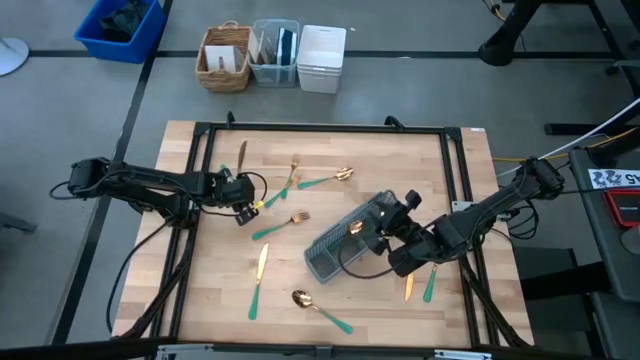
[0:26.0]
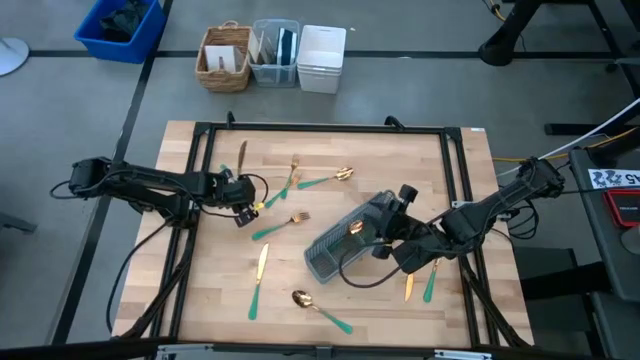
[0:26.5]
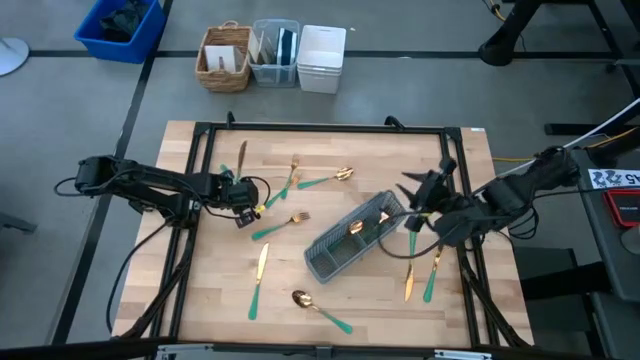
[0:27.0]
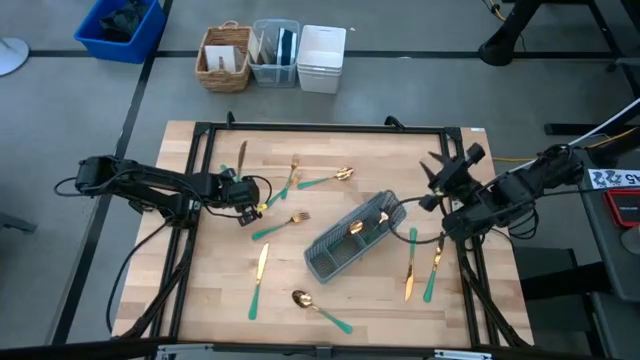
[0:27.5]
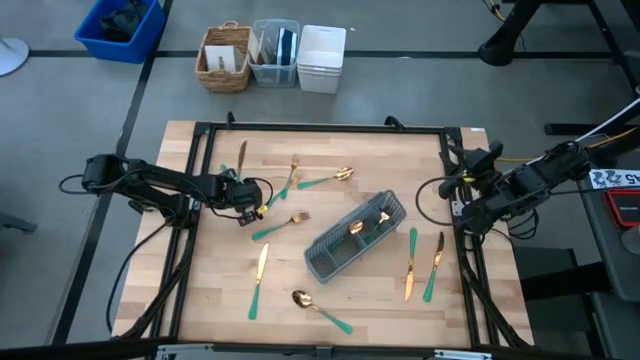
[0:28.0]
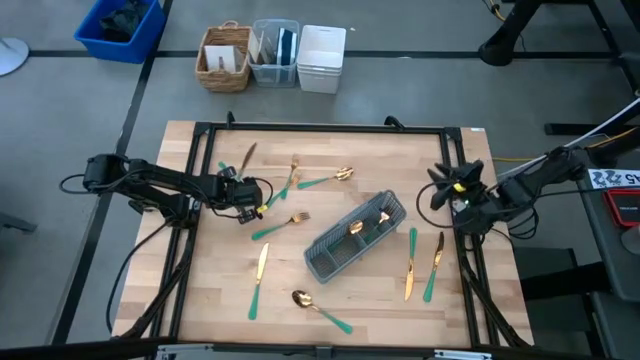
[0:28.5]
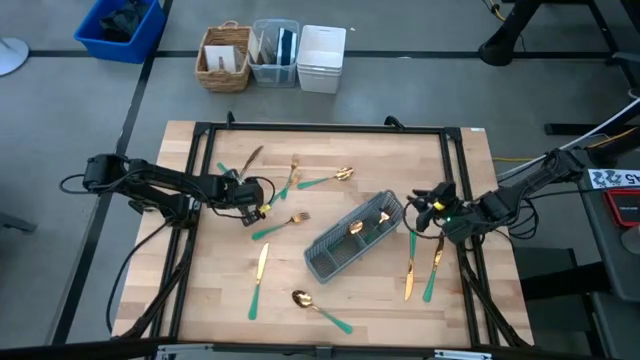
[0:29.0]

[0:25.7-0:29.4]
Task: Sort silverware
Put the gold spoon into the gray silverware organizer

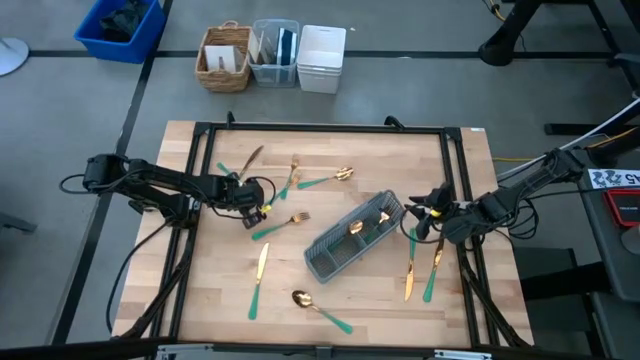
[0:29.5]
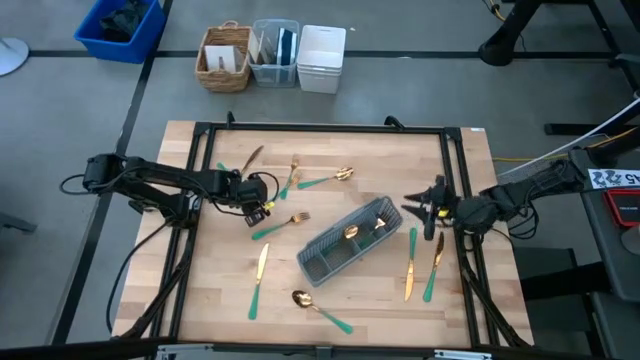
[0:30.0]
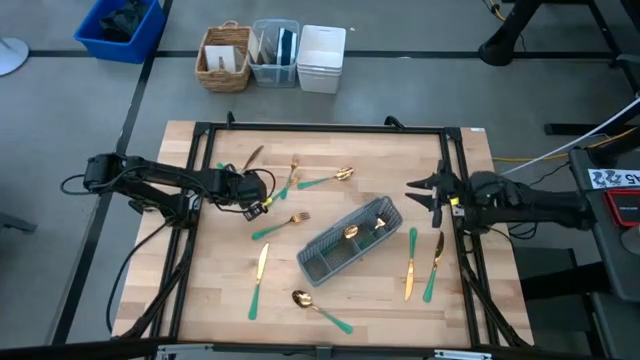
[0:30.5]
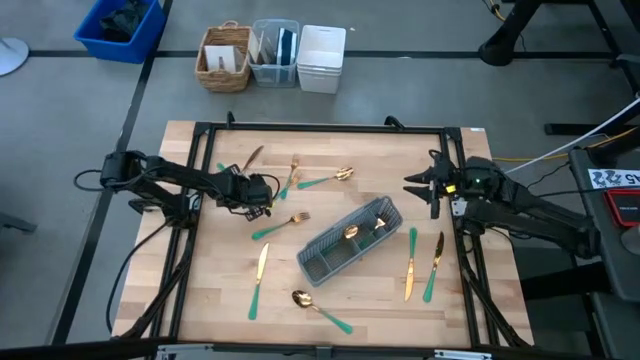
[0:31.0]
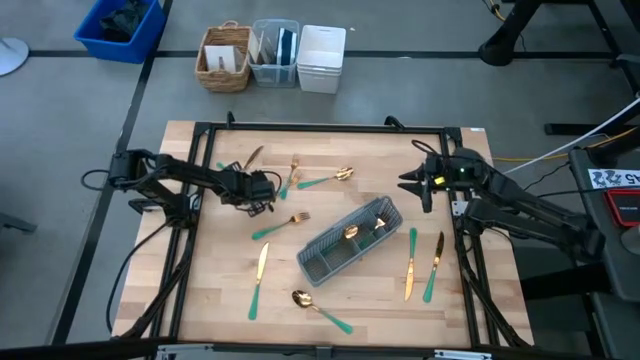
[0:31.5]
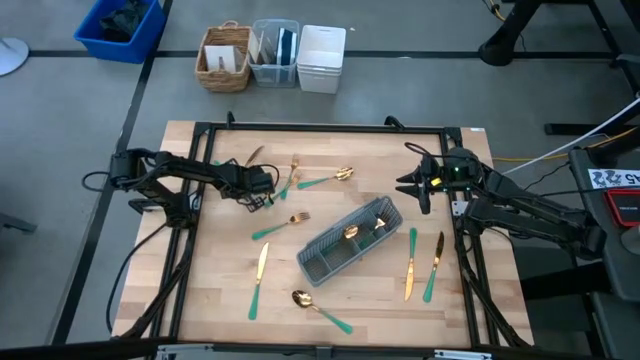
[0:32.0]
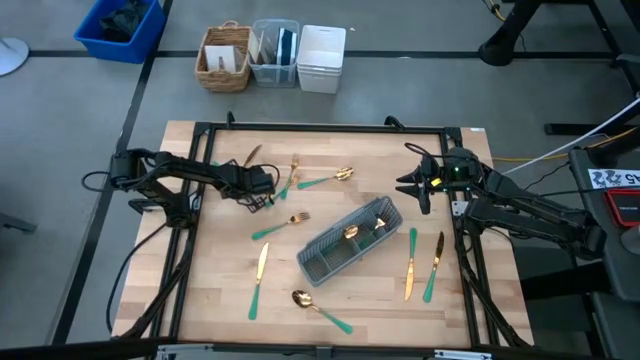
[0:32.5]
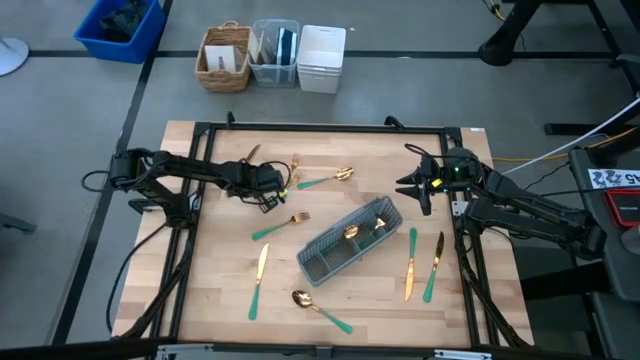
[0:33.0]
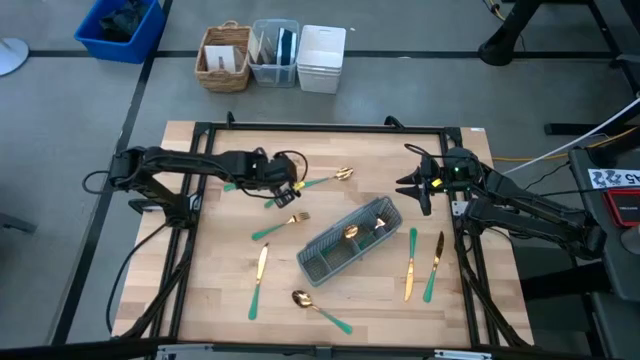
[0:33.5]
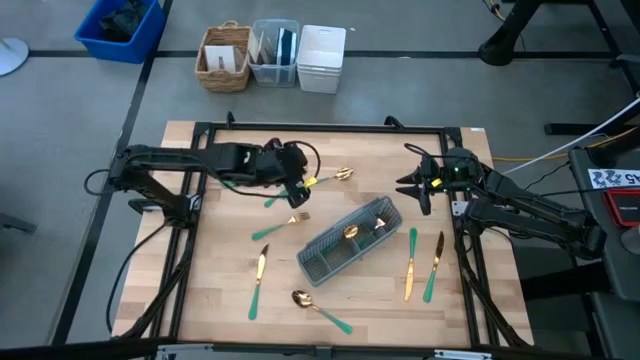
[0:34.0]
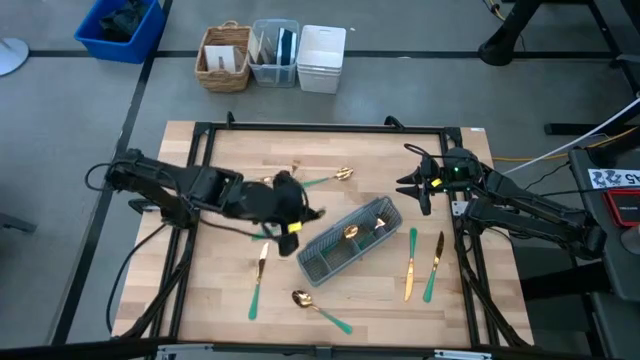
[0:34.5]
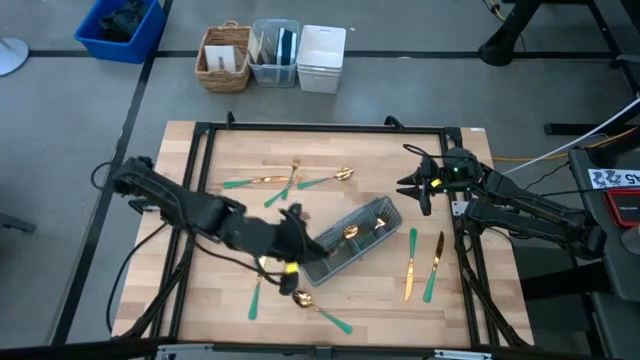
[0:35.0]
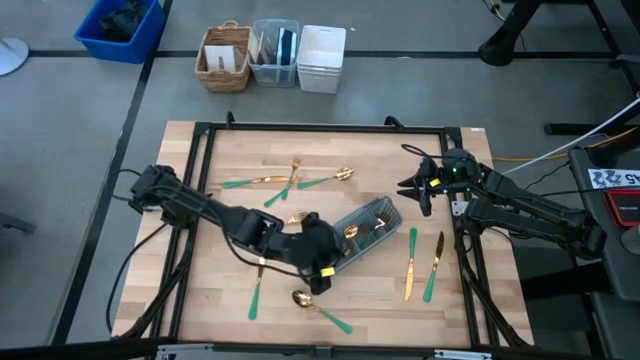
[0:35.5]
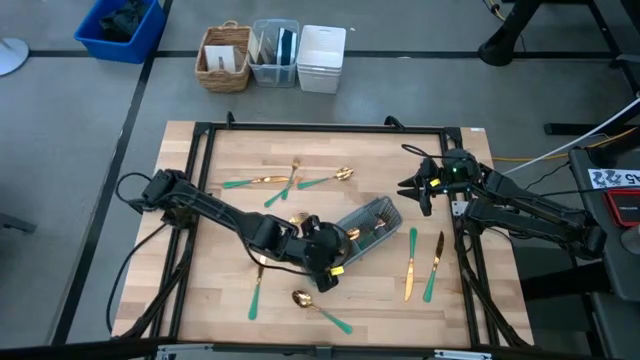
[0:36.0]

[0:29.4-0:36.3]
Put the gold spoon into the gray silverware organizer

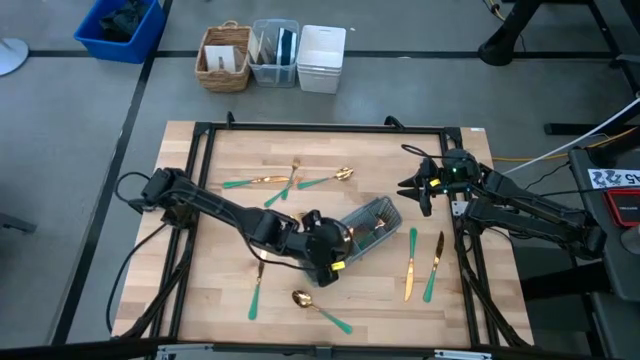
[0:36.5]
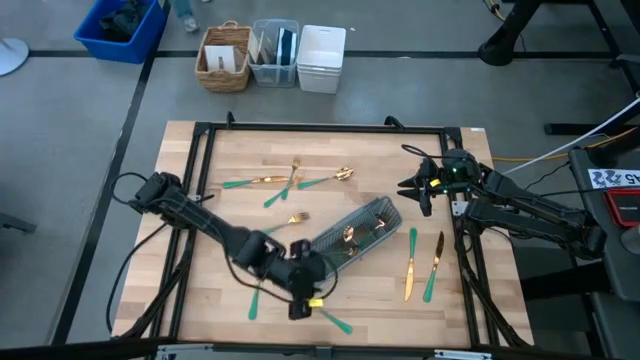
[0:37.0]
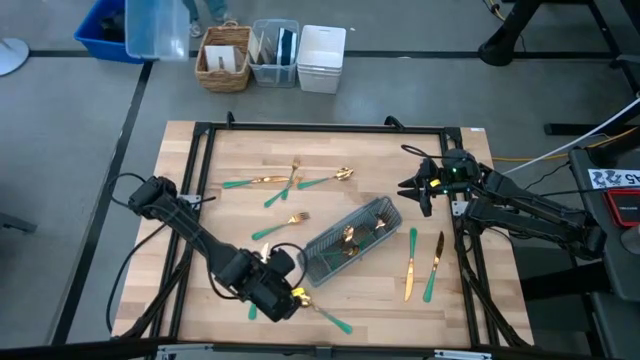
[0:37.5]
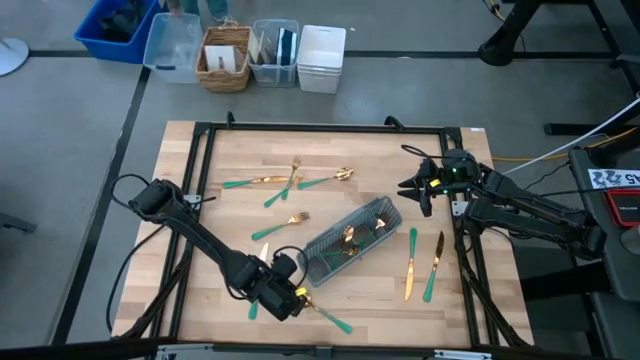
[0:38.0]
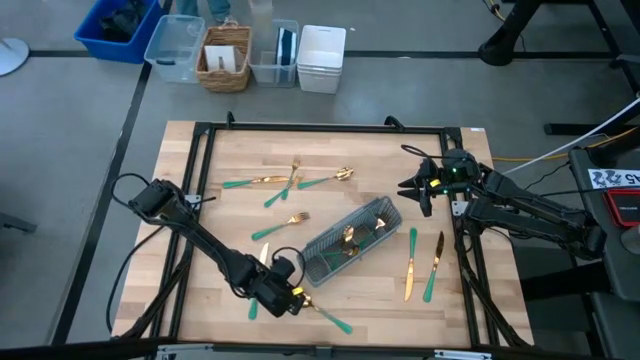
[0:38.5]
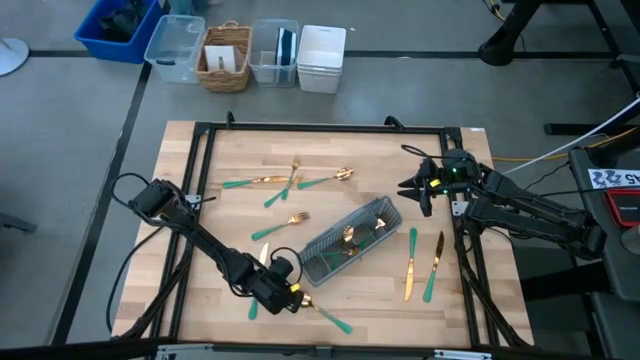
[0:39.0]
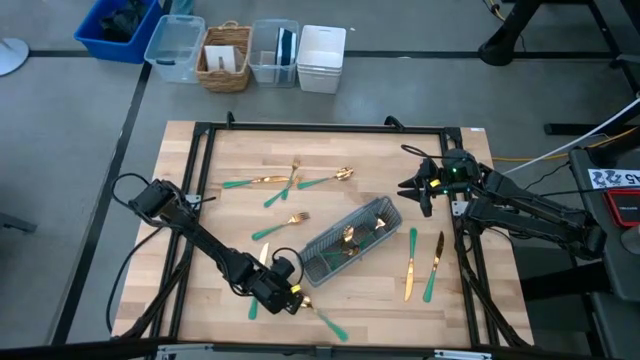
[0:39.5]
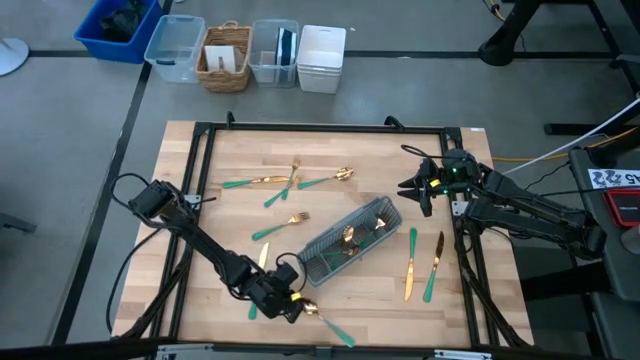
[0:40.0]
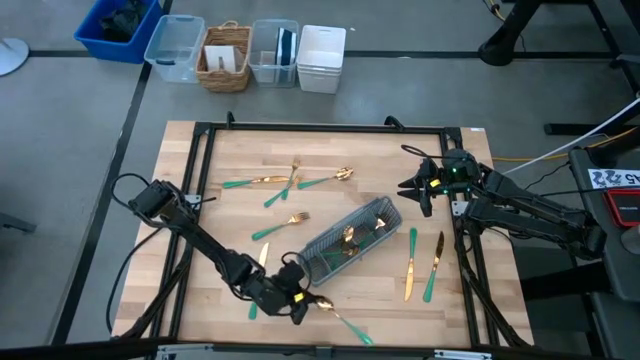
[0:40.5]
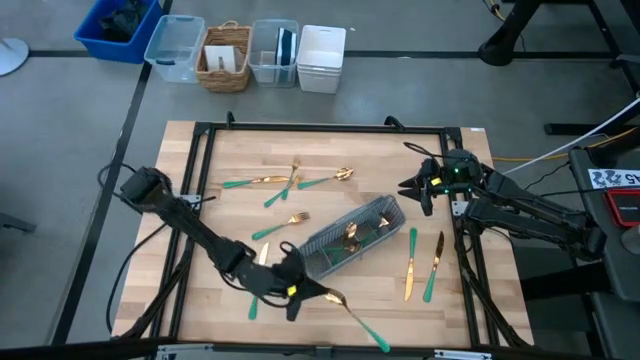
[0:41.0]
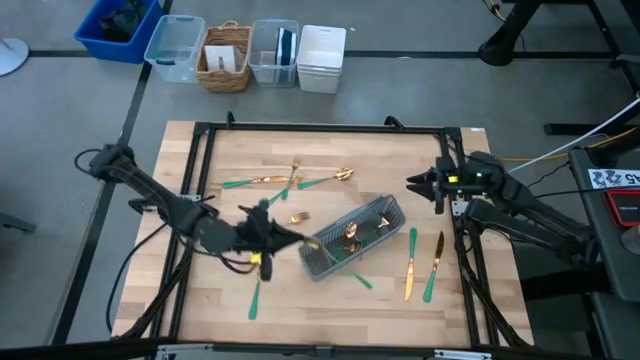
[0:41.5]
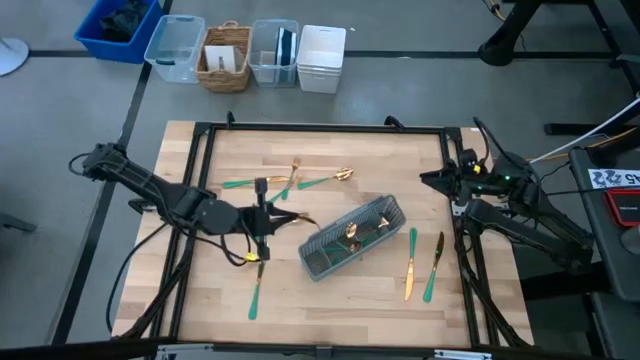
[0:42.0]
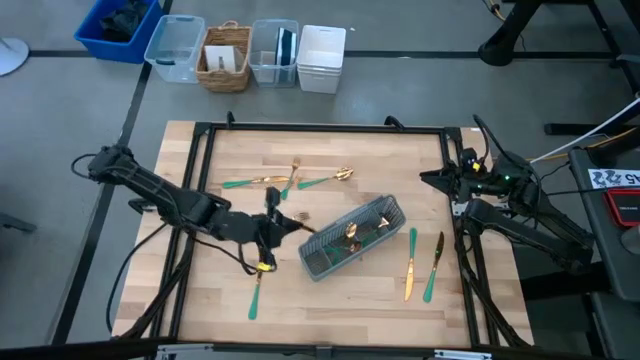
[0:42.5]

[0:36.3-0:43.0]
Put the gold spoon into the gray silverware organizer

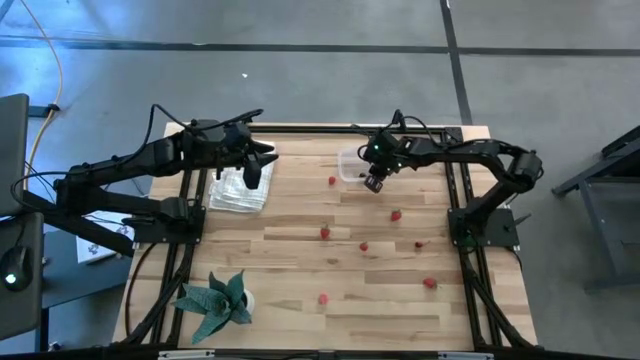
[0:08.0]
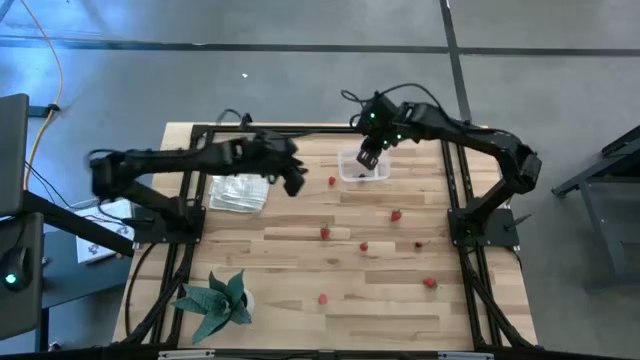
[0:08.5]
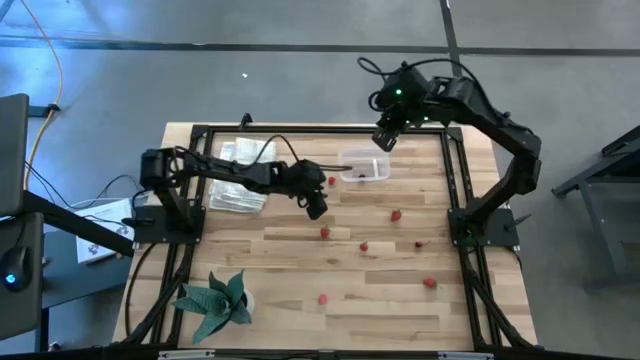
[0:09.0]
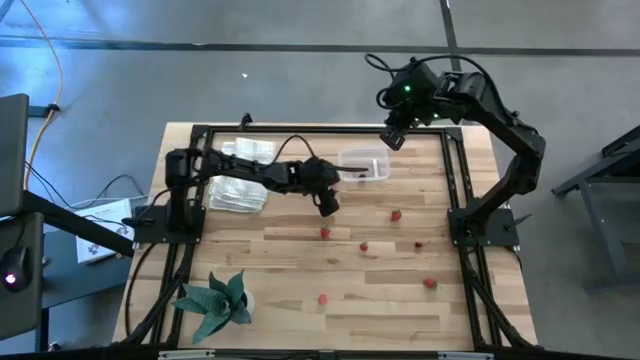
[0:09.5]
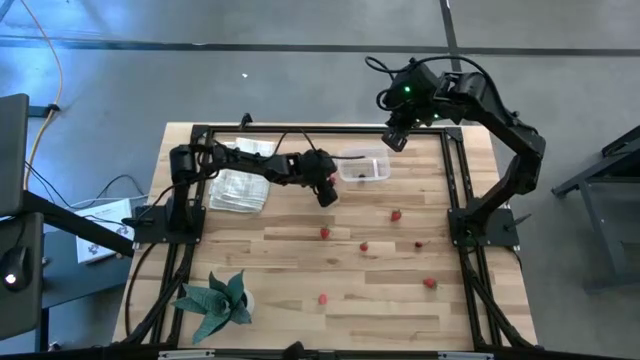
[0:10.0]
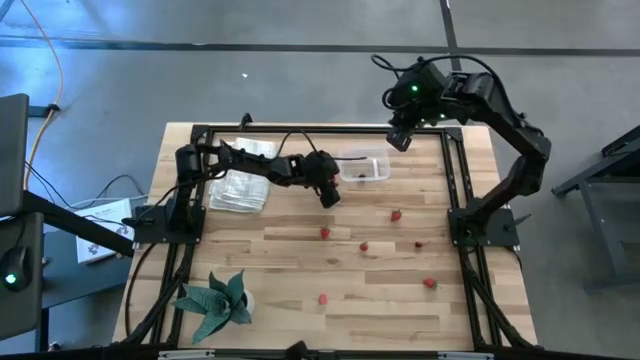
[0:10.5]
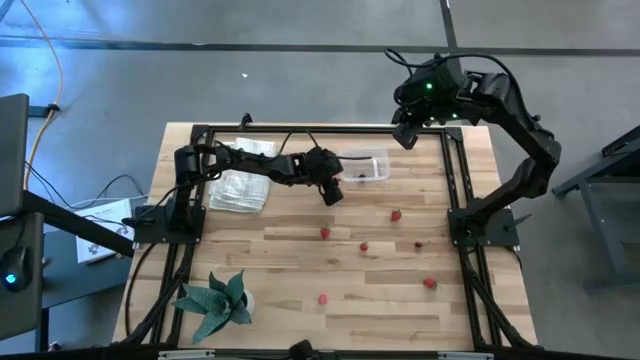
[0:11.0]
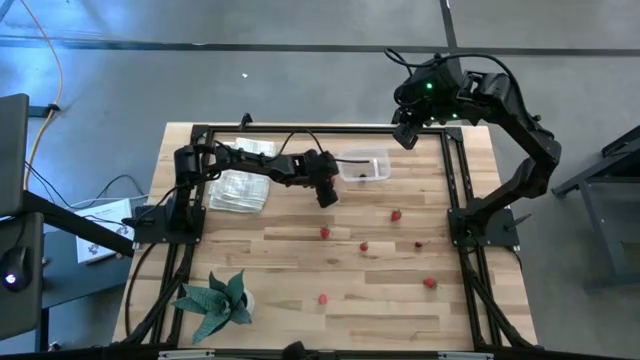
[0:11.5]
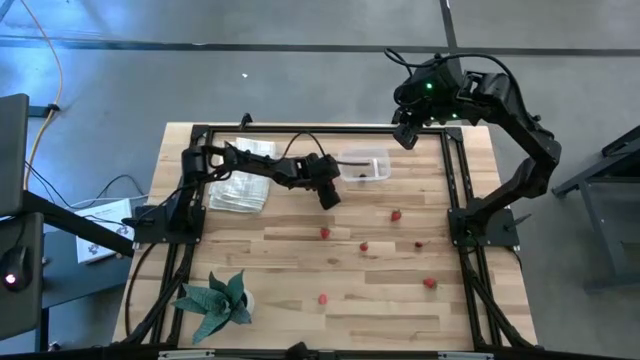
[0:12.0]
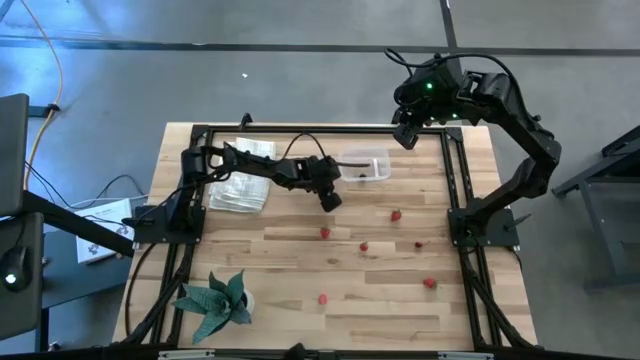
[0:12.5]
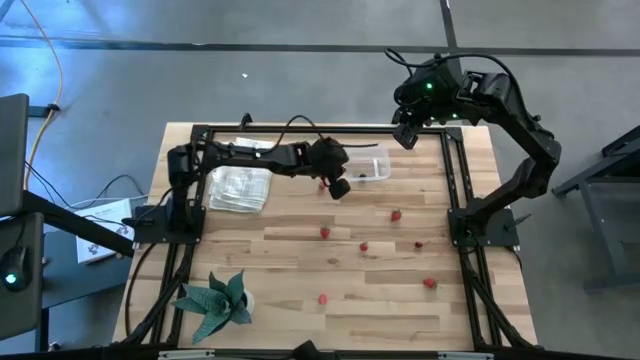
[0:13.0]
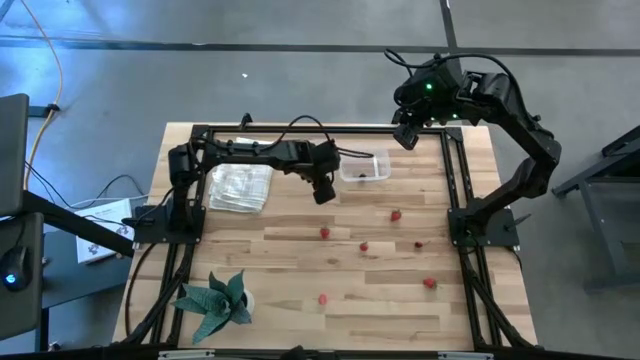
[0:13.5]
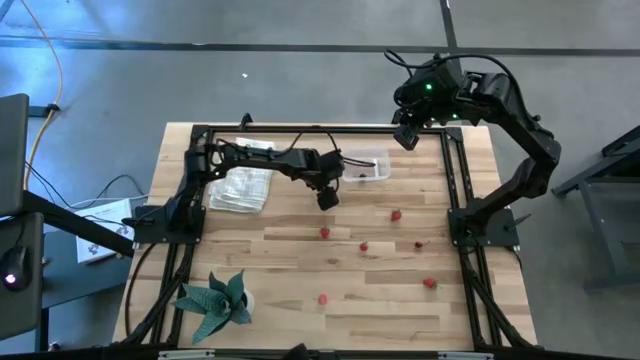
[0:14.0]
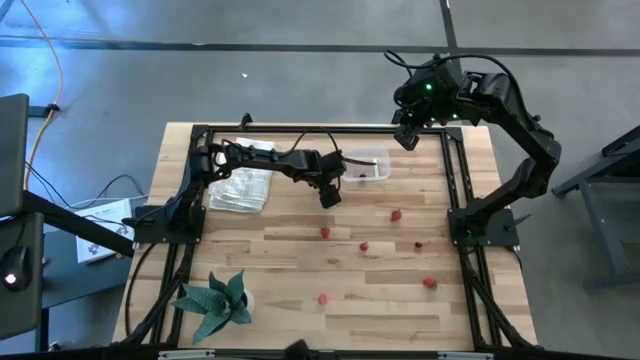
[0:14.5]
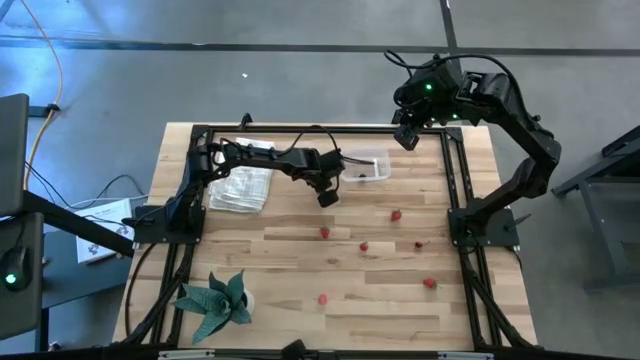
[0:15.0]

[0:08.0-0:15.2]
Task: Pick and placing Produce into tupperware
Put the red raspberry into the transparent container
